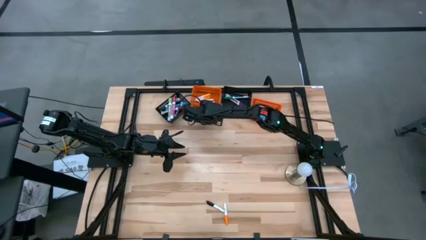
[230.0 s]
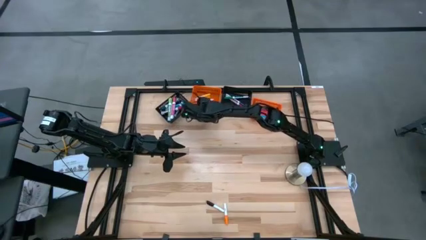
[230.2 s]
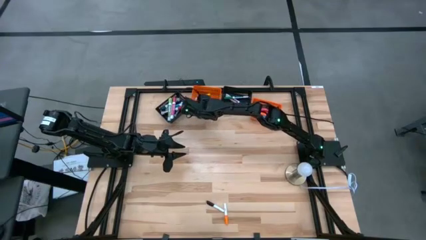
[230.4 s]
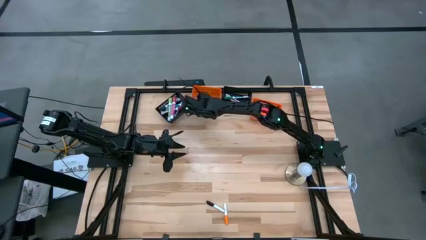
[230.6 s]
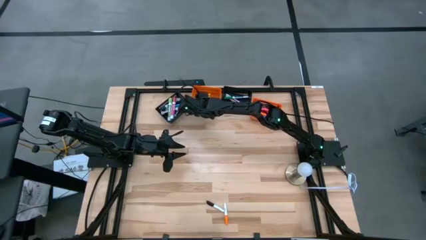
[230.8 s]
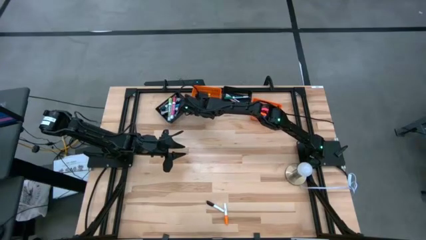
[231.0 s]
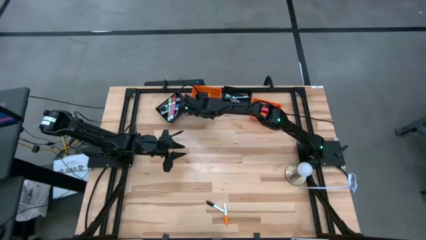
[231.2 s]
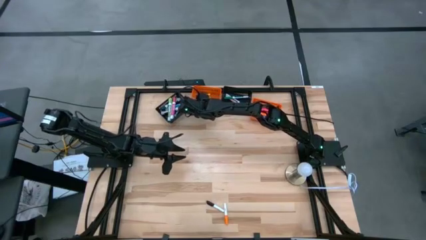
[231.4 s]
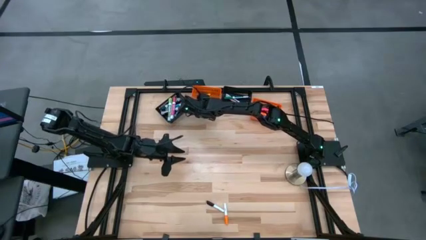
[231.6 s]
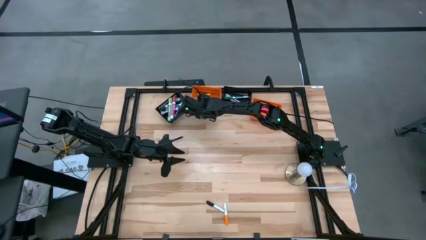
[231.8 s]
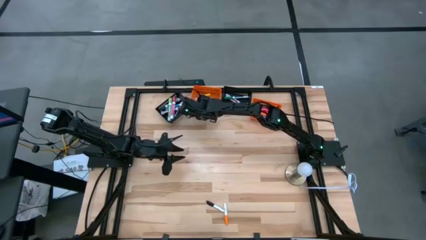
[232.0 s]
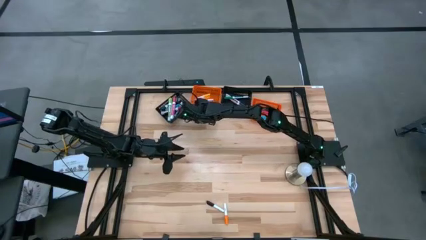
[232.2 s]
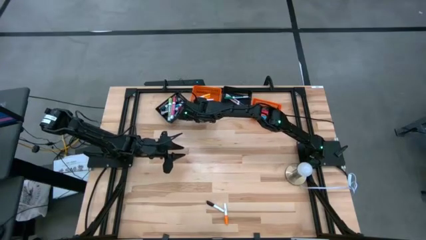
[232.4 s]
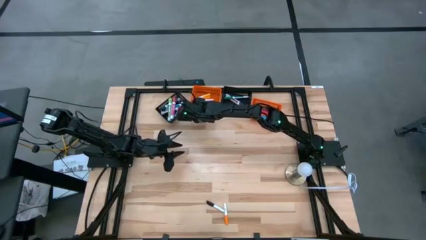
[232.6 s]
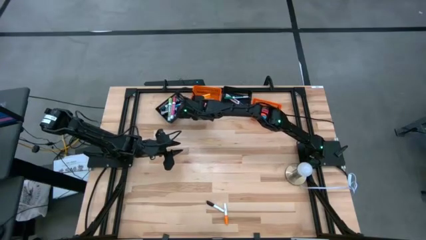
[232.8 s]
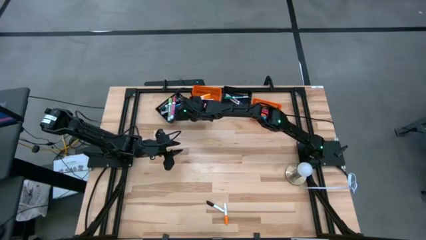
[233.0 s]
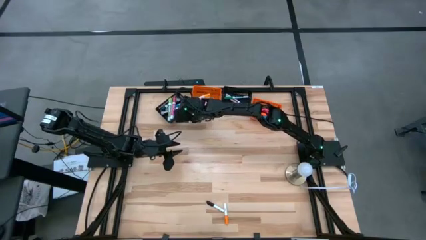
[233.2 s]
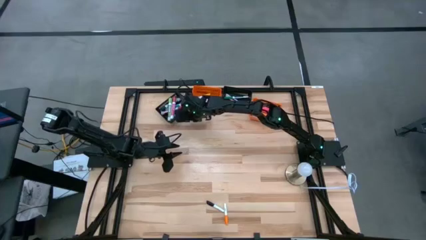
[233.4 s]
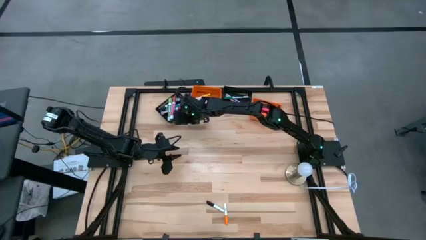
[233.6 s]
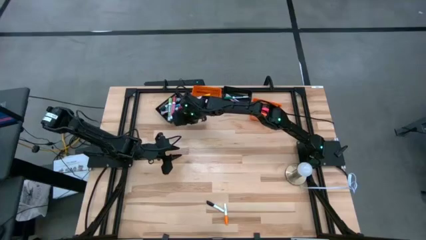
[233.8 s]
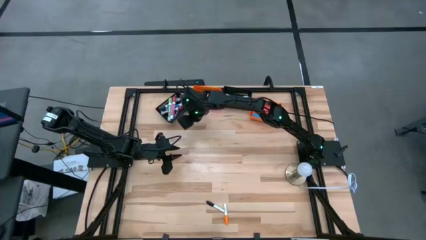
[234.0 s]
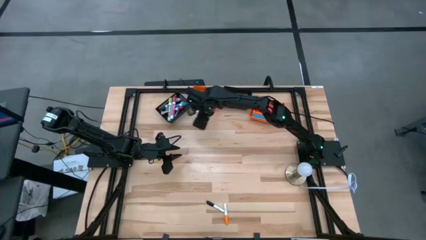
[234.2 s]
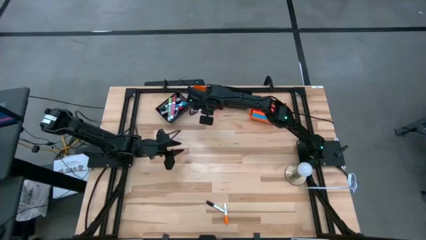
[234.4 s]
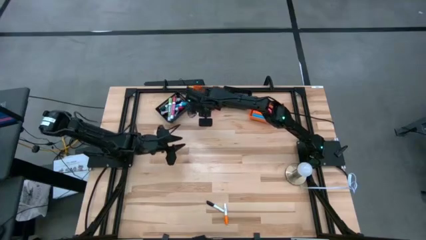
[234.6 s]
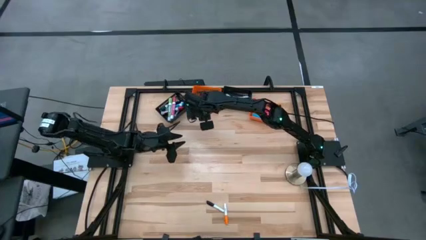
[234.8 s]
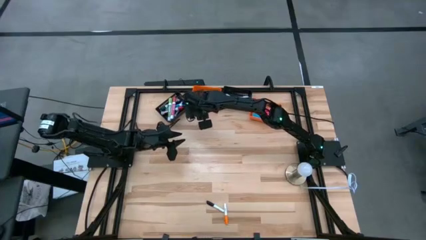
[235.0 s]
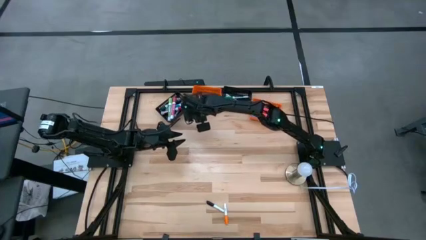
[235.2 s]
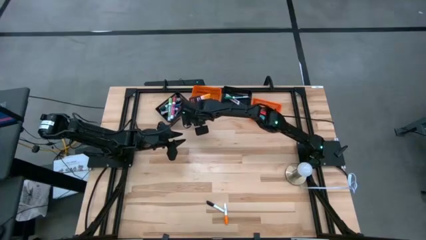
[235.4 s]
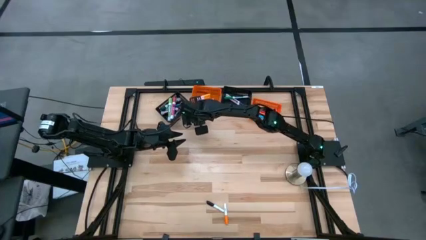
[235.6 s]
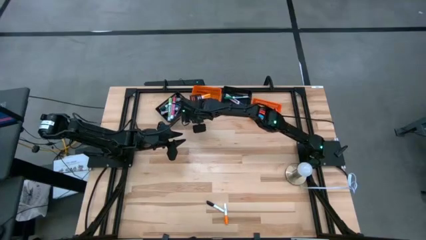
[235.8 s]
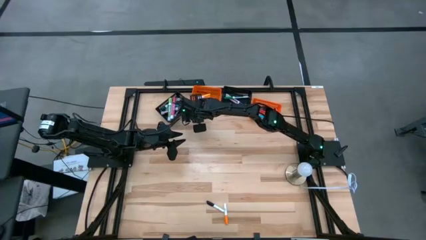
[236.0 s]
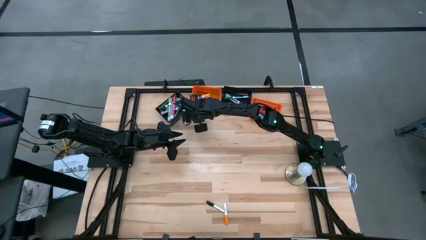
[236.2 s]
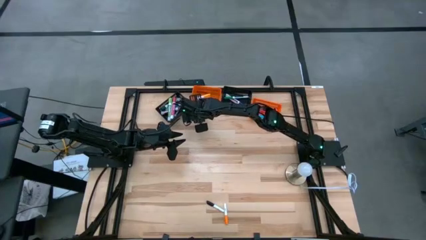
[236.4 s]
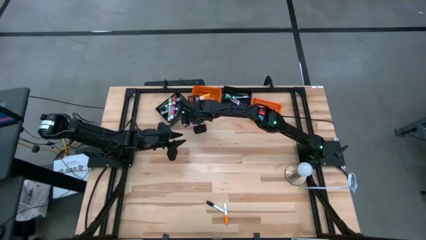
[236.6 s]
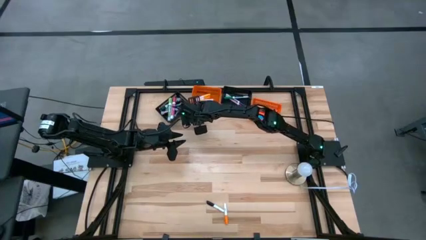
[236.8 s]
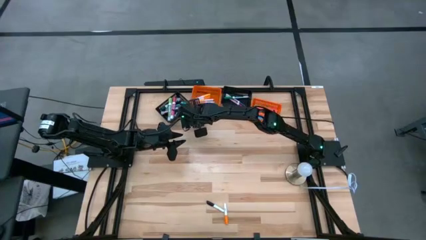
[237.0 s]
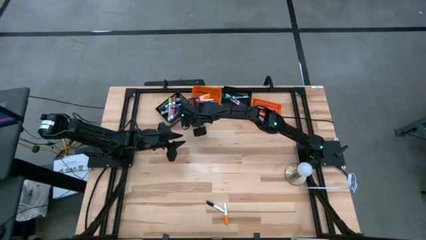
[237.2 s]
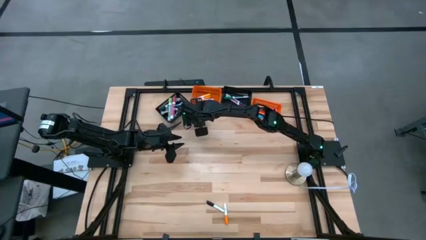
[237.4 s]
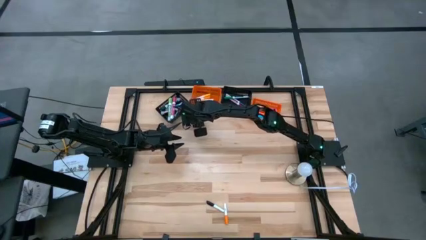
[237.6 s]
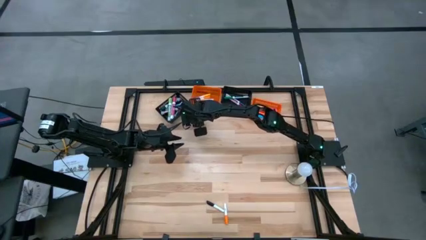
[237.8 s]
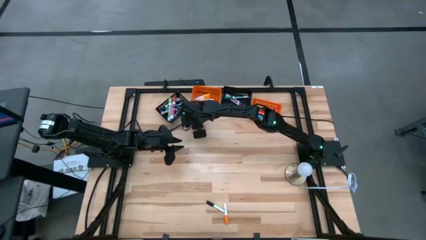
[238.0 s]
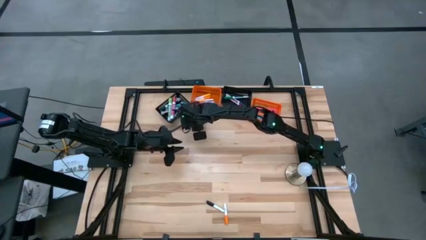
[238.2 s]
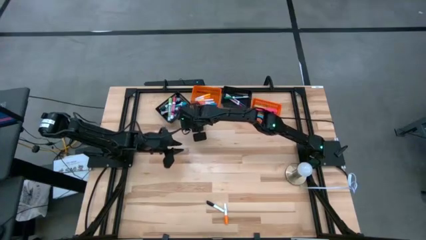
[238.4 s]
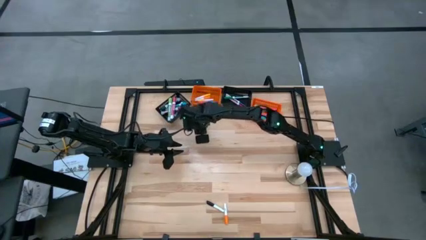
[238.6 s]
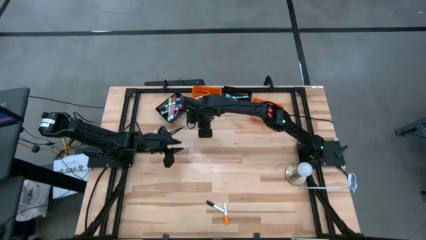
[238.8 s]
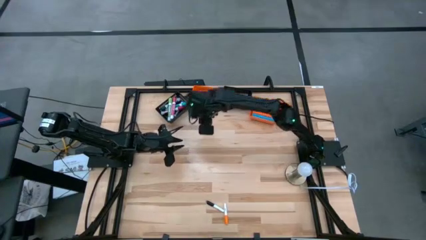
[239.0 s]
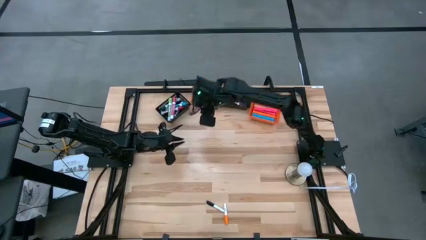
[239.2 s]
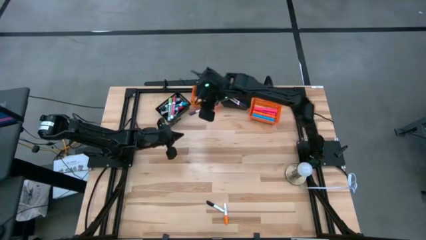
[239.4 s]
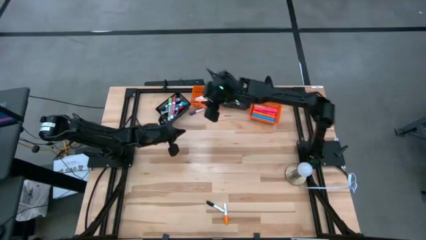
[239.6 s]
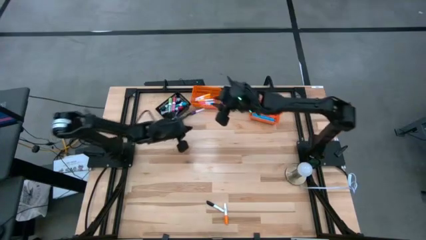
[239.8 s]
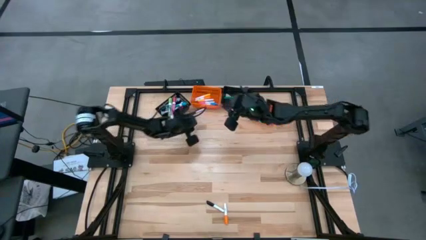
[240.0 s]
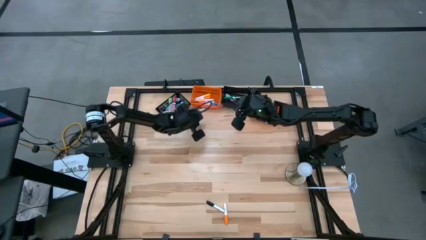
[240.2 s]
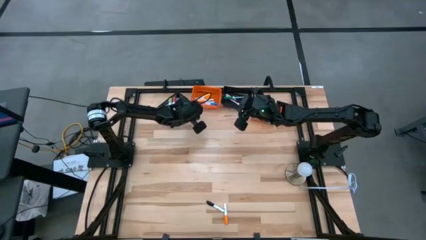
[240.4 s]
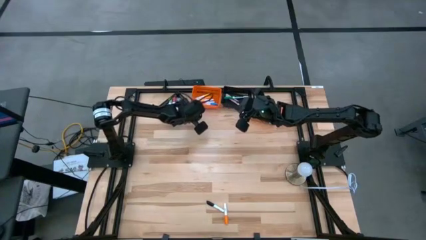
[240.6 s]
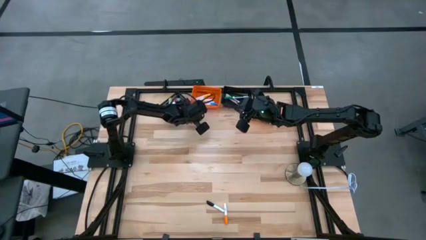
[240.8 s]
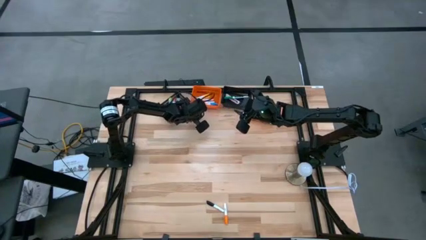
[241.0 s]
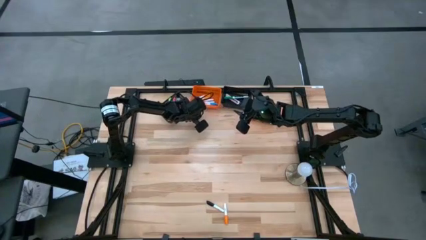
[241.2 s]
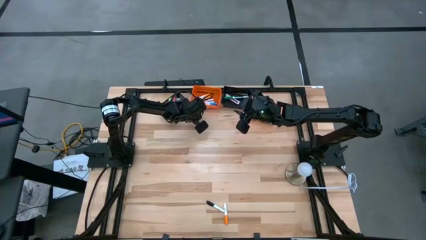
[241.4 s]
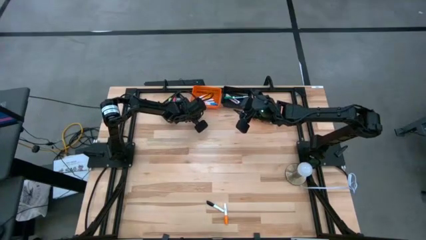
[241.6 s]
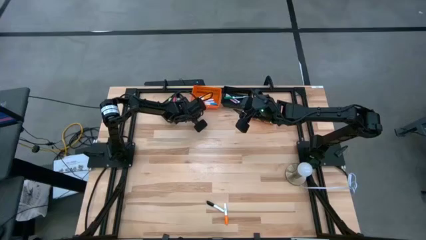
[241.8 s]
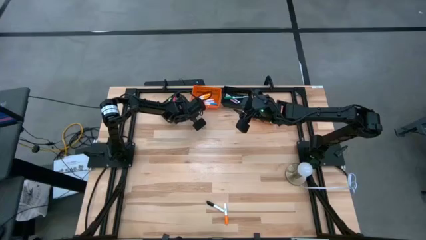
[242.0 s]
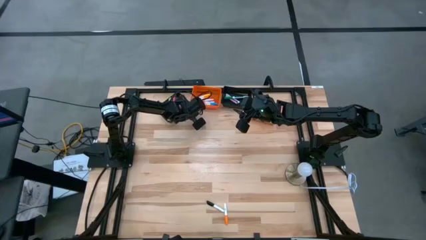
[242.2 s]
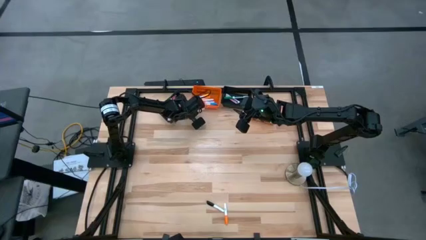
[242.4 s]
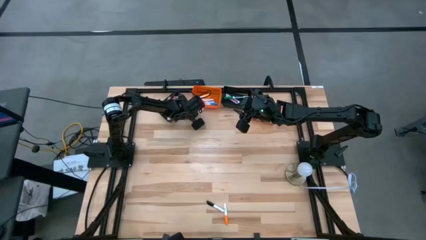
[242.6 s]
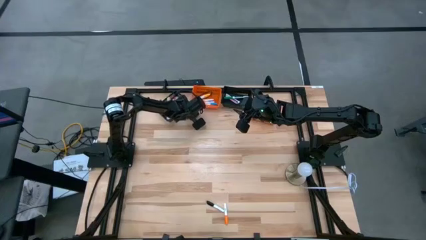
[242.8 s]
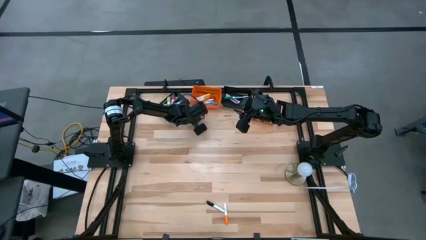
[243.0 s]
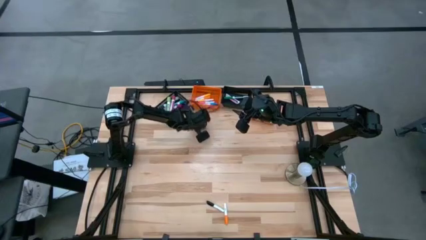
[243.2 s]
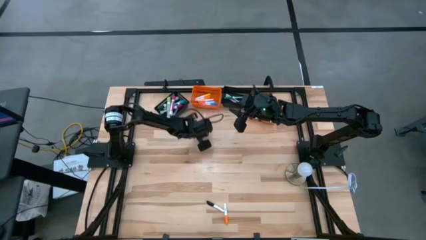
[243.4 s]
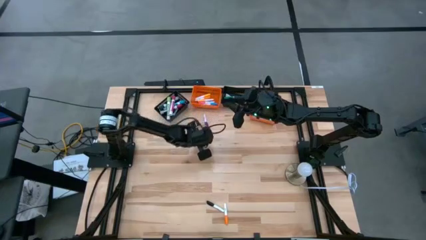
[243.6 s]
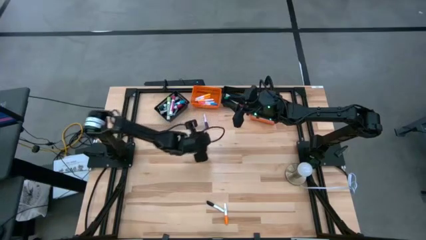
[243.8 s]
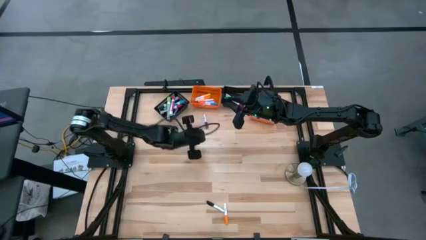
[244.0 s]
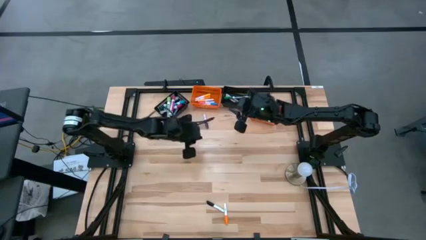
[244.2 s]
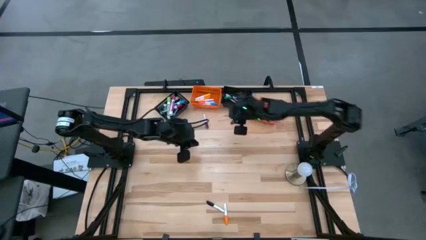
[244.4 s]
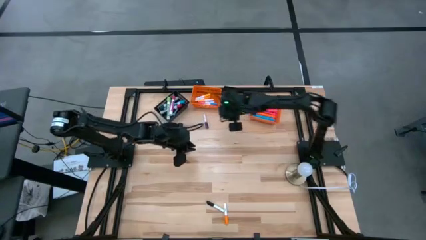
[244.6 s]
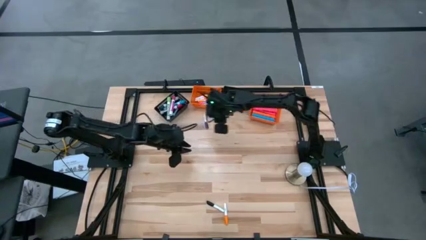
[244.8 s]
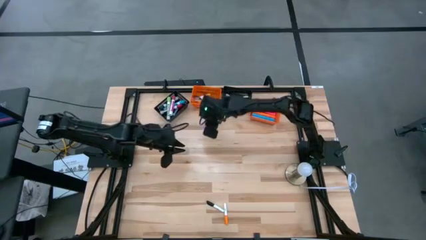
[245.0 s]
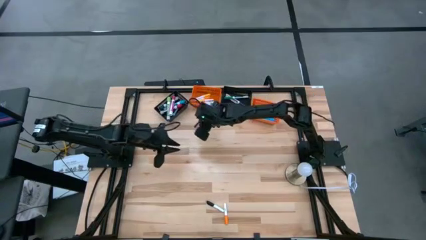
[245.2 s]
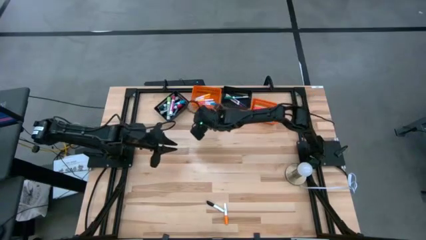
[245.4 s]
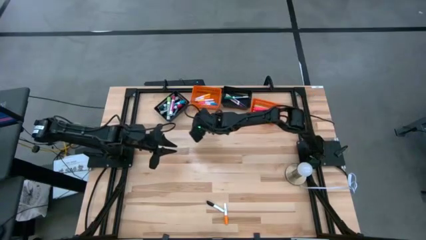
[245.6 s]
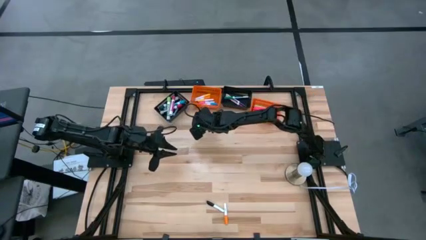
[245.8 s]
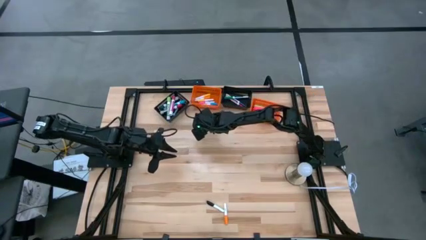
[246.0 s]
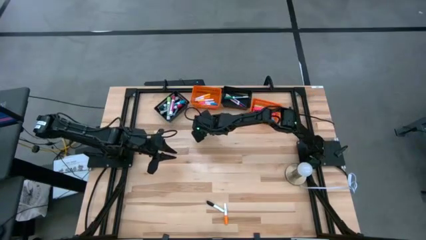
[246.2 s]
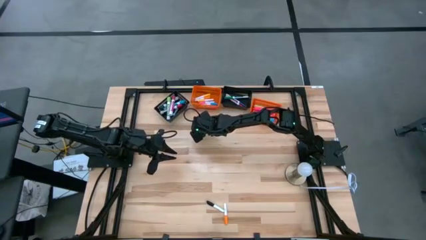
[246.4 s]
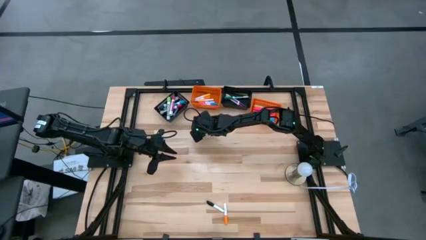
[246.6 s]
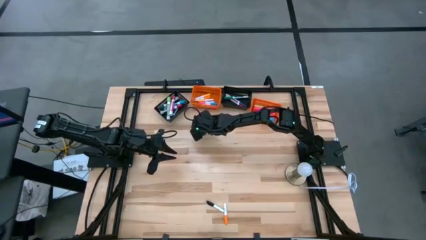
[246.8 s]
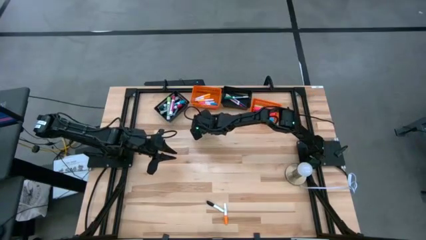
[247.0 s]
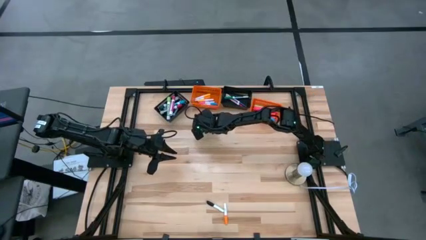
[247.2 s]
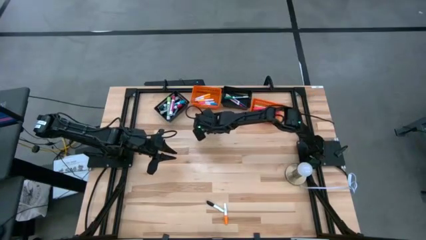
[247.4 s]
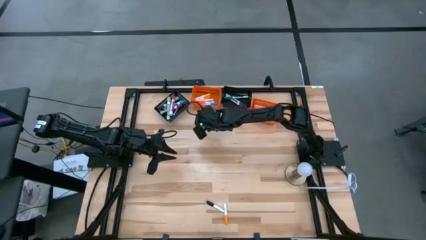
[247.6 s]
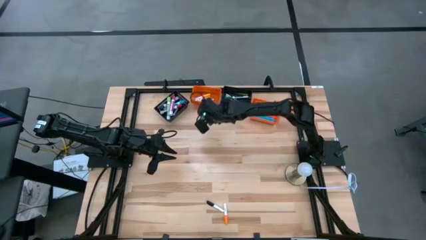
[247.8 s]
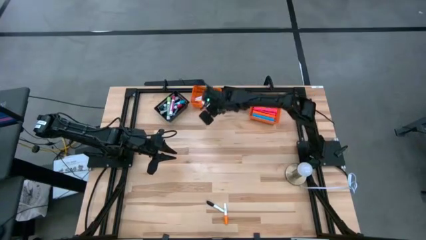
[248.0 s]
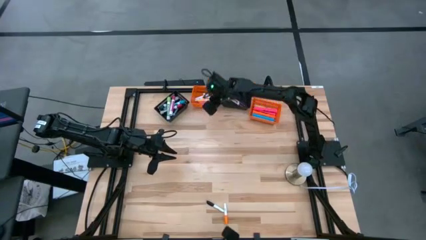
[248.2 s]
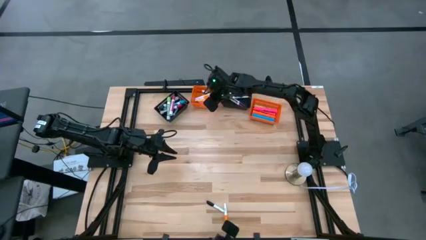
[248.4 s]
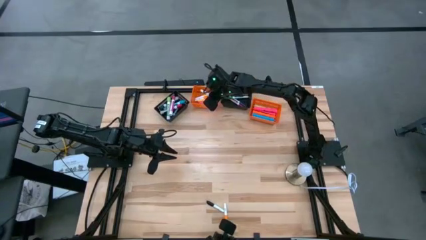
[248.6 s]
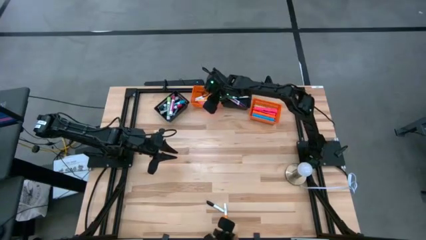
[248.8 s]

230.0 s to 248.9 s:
Task: Pick & Place Markers
Put the small purple highlighter into the left orange bin
